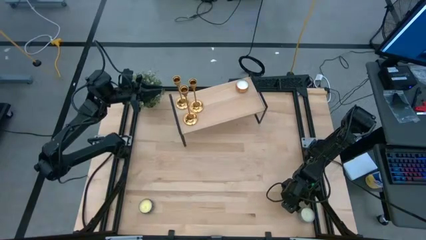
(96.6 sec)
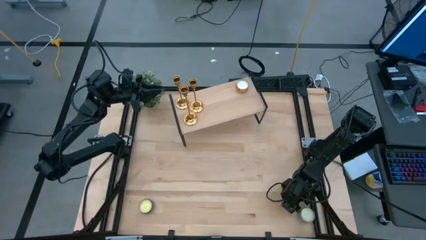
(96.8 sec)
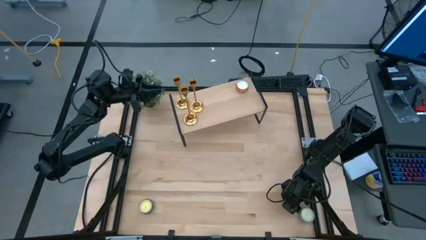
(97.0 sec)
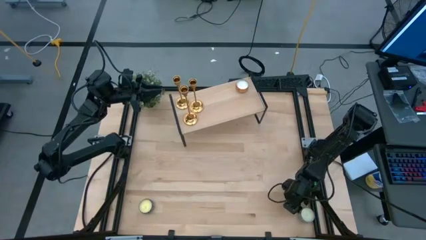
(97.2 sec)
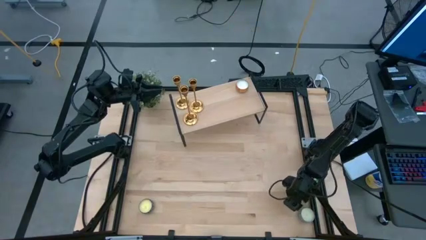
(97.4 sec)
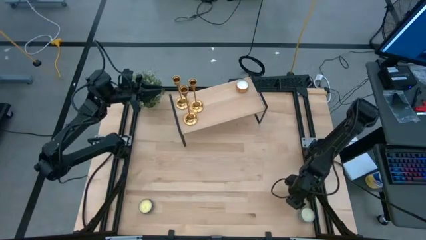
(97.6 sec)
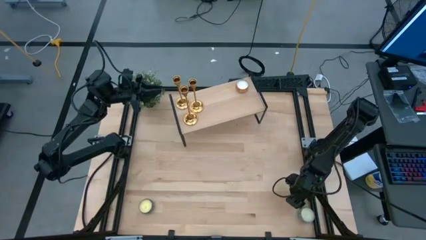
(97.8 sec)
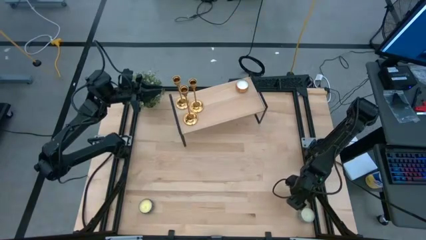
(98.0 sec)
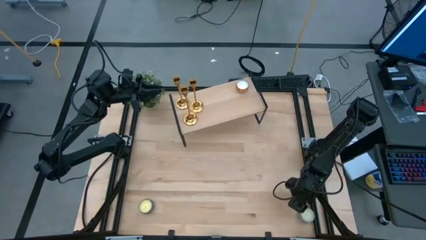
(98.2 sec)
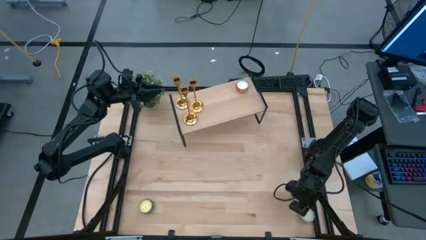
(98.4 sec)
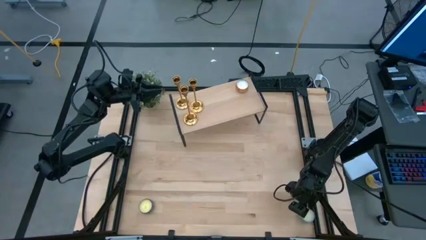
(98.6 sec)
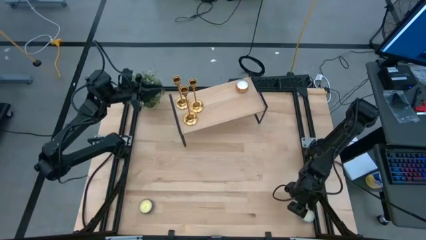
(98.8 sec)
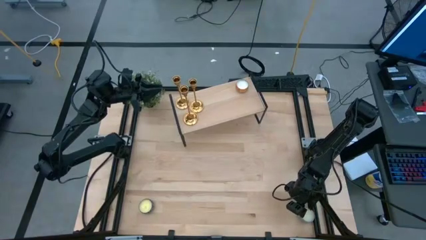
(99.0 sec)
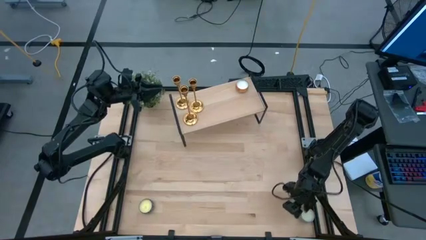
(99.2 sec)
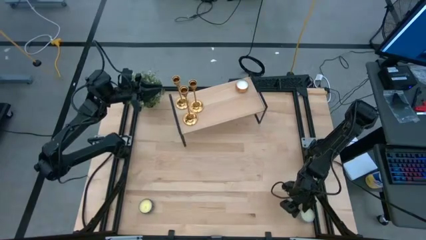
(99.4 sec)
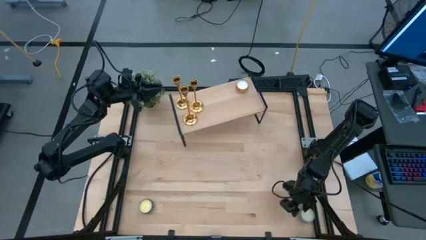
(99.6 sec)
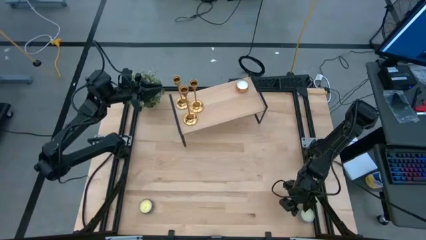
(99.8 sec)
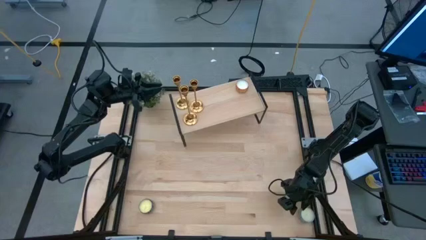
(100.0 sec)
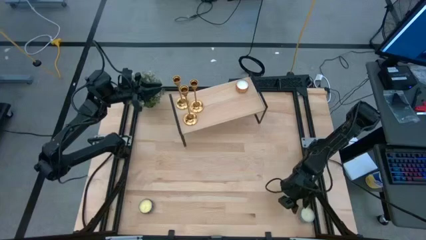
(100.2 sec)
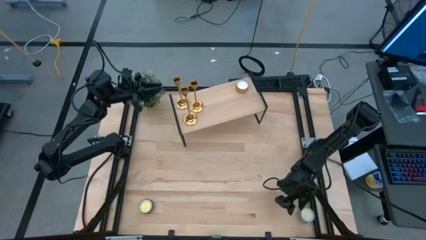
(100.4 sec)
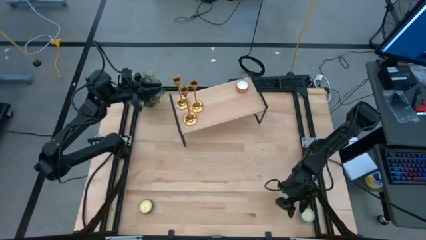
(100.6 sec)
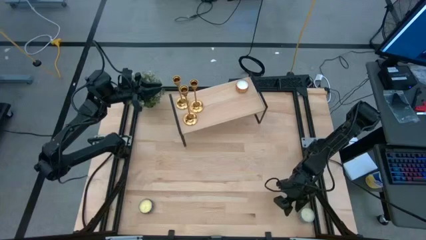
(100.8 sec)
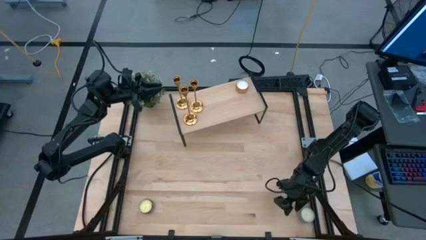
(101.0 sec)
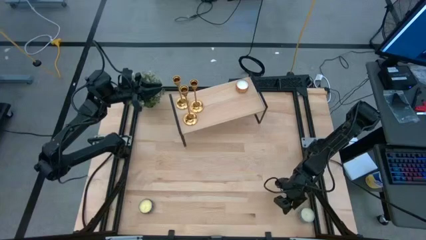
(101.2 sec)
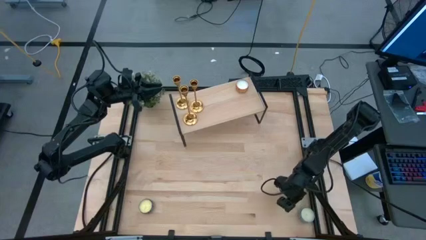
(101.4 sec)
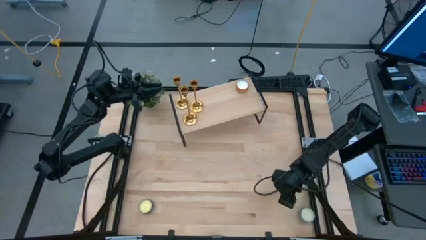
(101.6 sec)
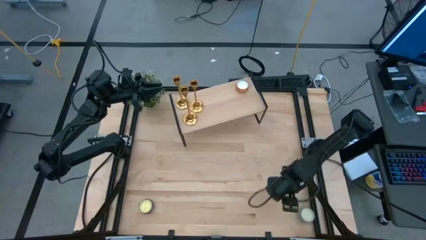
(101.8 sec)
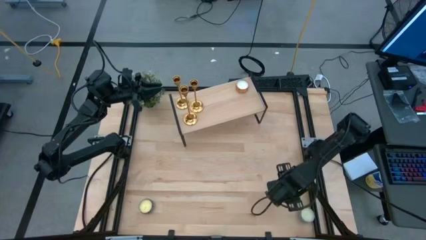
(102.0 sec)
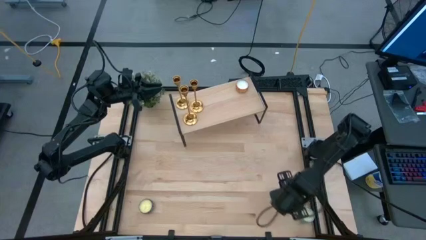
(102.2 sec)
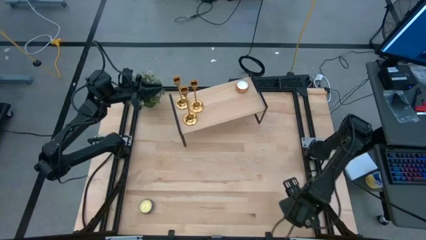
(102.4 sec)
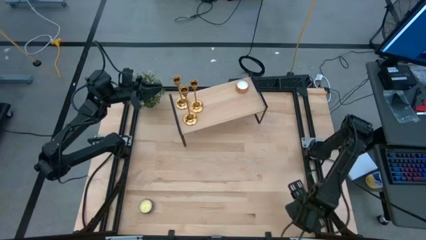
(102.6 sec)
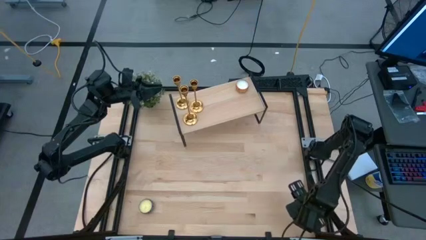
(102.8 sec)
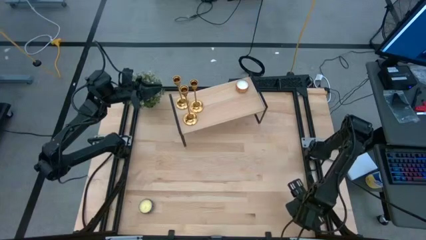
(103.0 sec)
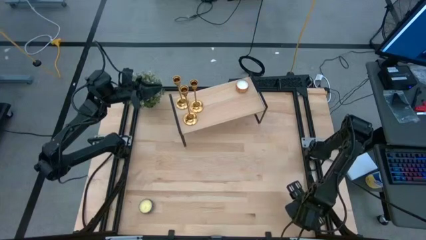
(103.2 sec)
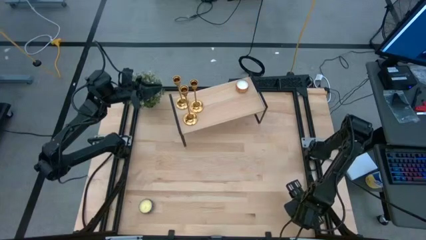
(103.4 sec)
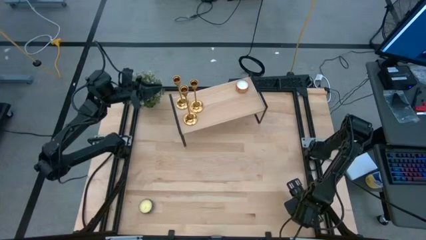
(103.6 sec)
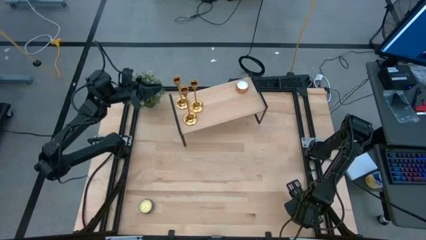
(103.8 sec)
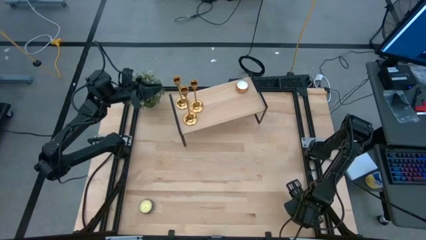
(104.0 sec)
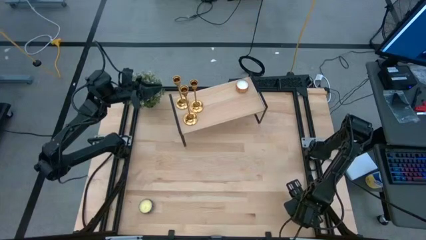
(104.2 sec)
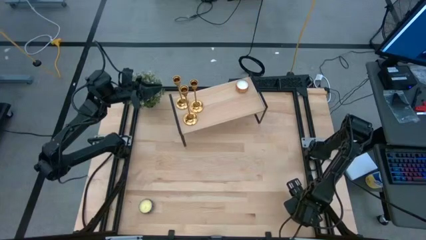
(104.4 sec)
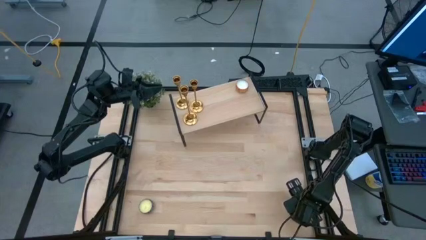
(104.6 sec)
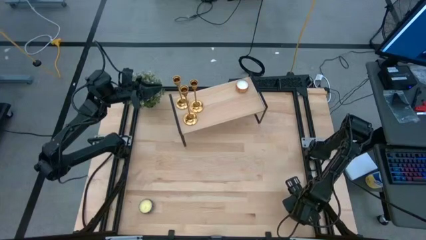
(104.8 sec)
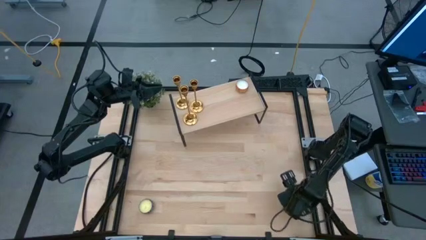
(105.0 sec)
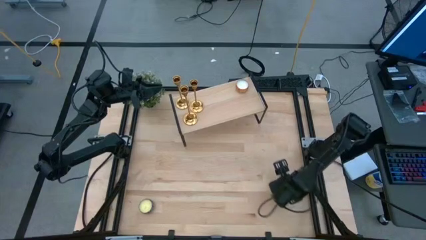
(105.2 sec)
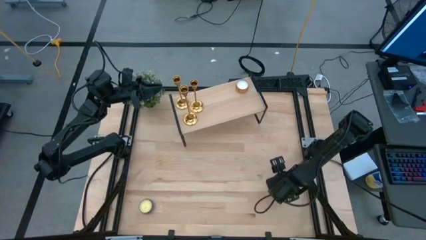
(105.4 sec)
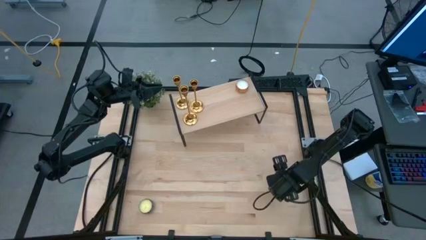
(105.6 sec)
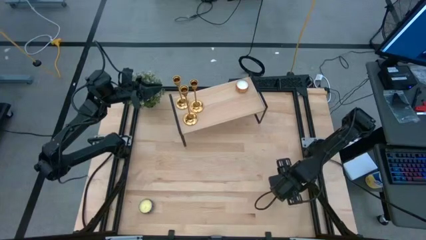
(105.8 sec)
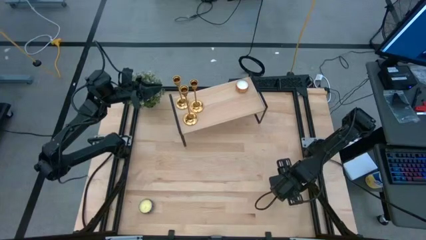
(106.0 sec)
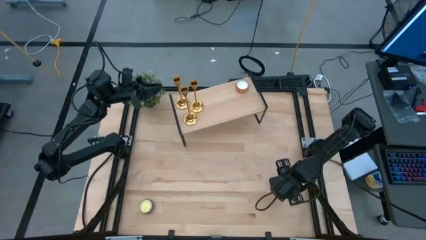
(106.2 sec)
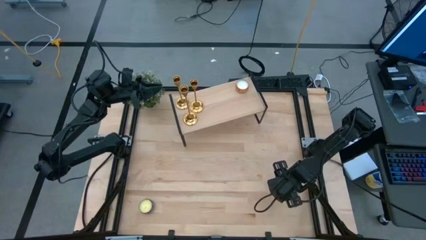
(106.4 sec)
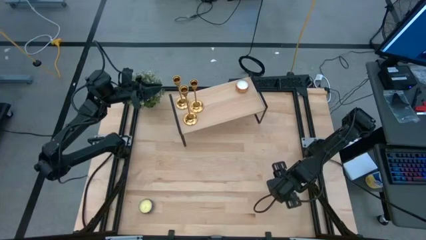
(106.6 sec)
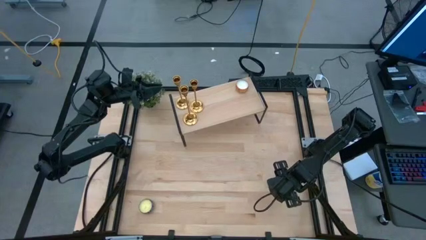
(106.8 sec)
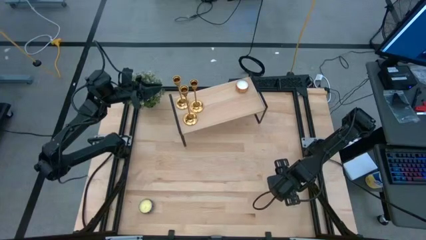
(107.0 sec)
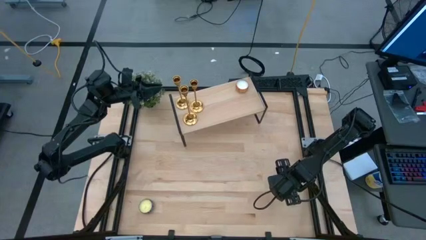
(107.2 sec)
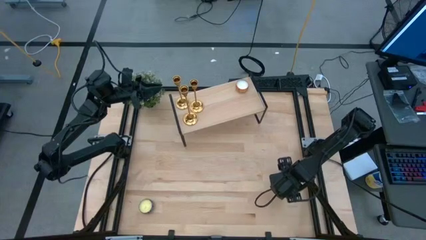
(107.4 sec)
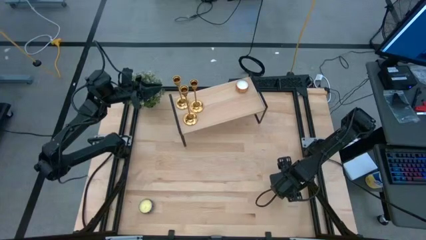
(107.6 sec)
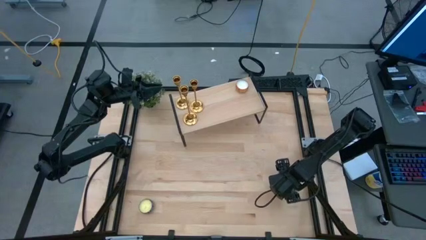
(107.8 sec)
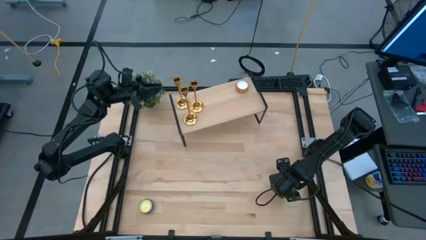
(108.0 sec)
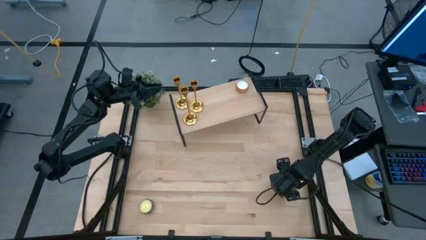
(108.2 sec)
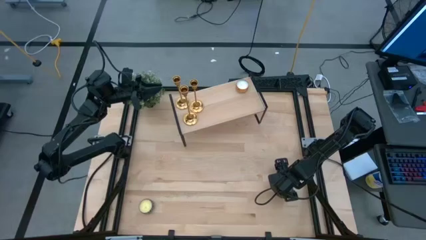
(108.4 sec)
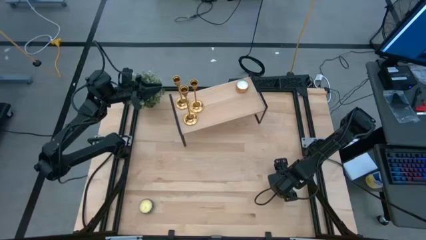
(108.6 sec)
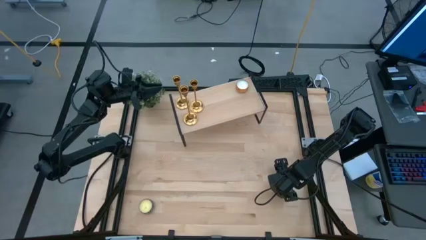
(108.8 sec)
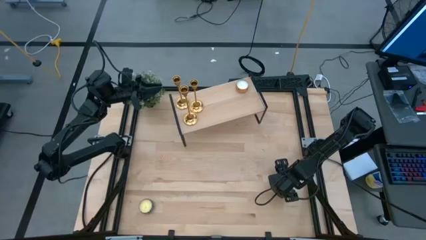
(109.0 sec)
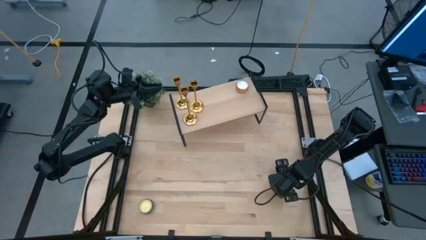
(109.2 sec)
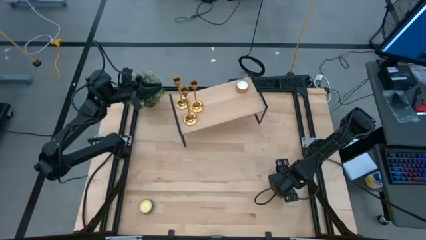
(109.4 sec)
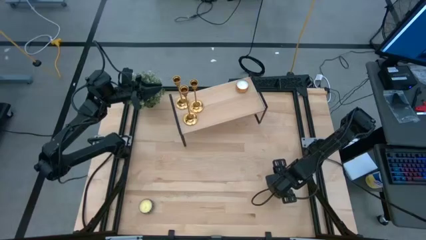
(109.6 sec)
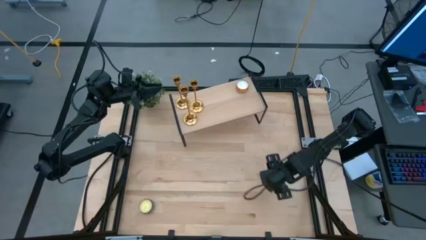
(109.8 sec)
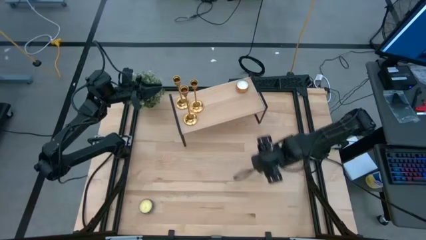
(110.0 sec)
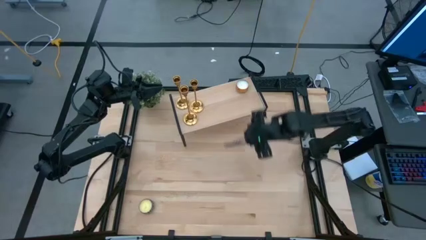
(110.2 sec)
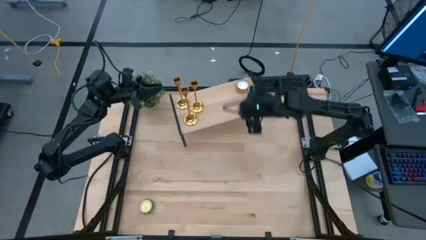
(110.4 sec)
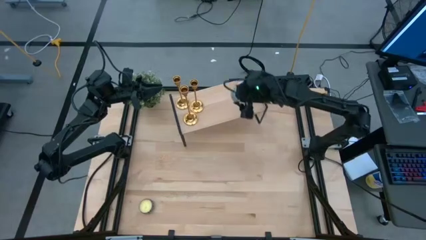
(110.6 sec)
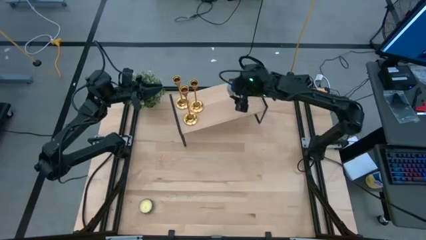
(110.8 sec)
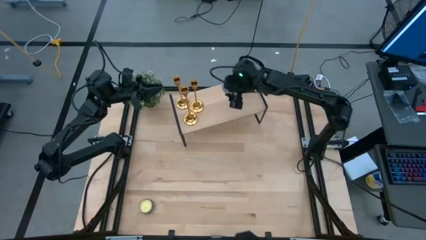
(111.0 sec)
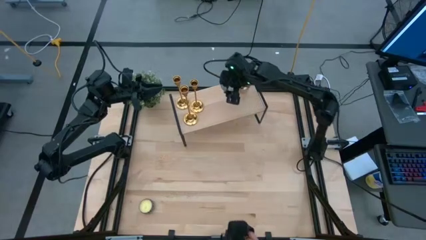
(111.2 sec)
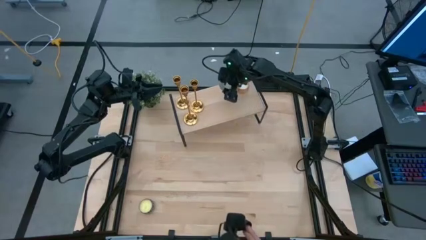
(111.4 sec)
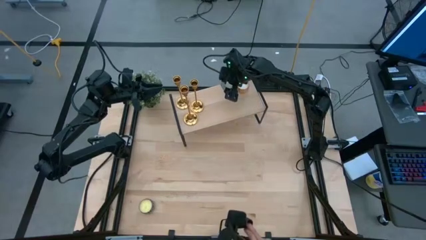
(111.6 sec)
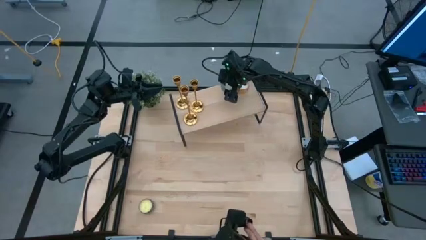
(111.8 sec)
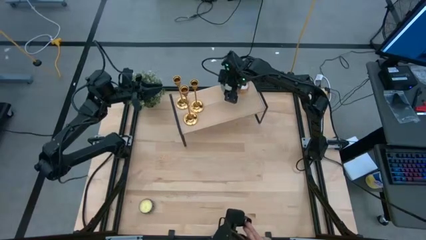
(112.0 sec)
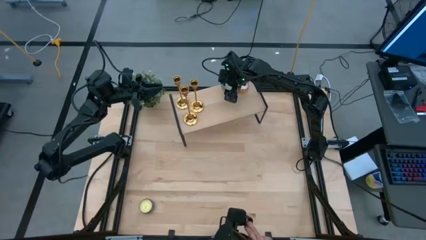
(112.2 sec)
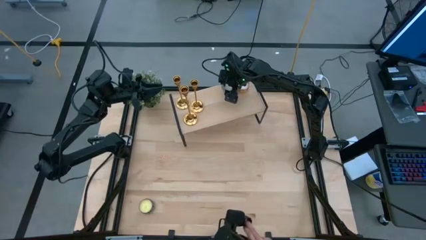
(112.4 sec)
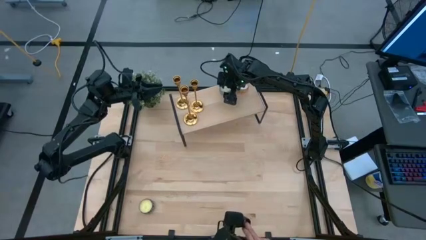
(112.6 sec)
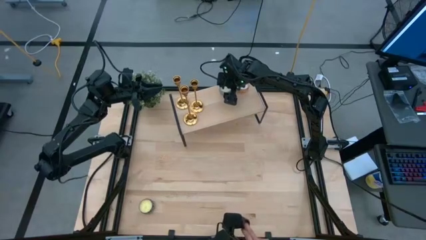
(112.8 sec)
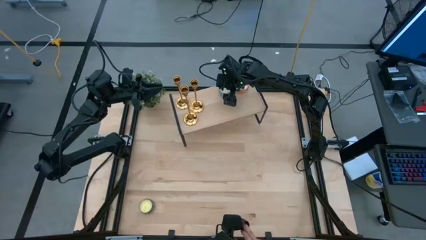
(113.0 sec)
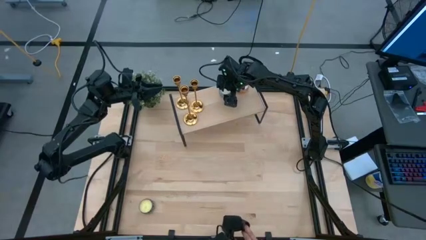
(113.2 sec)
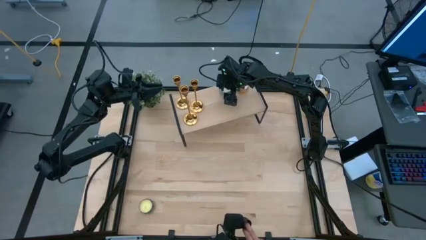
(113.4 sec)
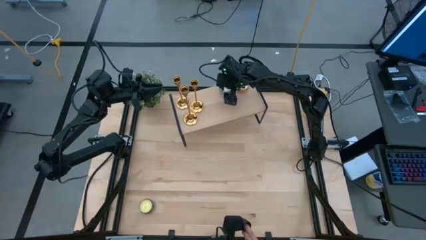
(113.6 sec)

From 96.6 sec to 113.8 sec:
Task: Pick & Place candle stick holders
Put the blue scented candle on the shelf
